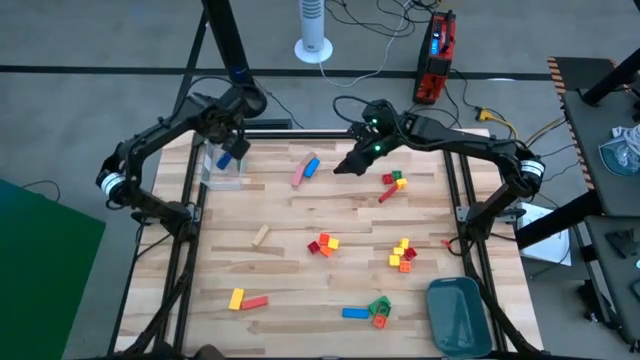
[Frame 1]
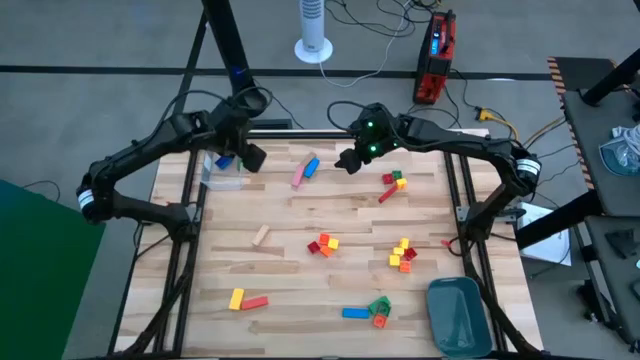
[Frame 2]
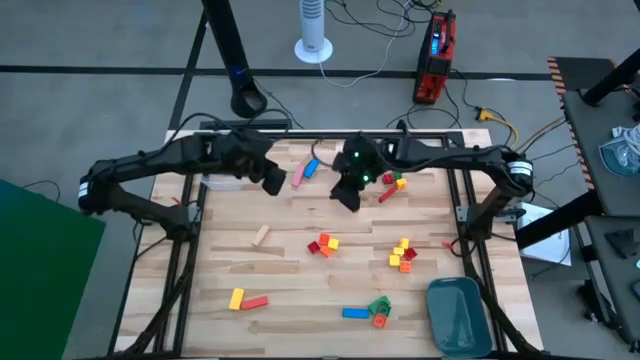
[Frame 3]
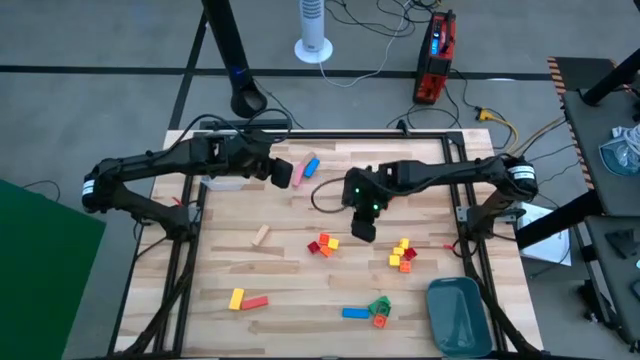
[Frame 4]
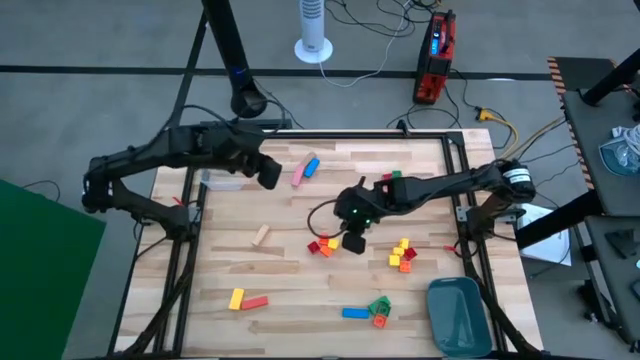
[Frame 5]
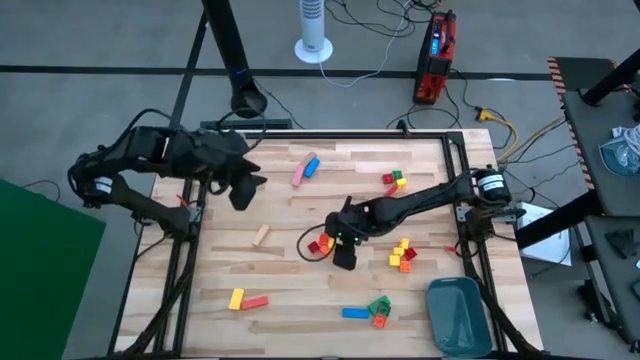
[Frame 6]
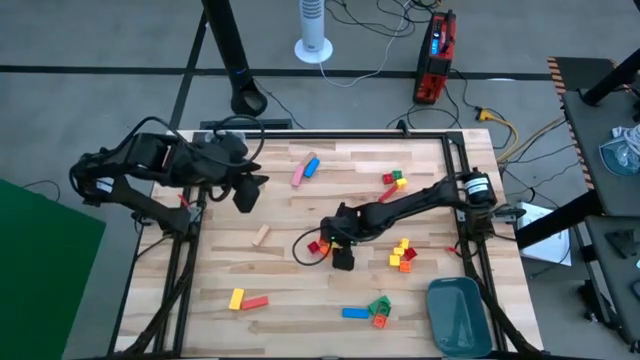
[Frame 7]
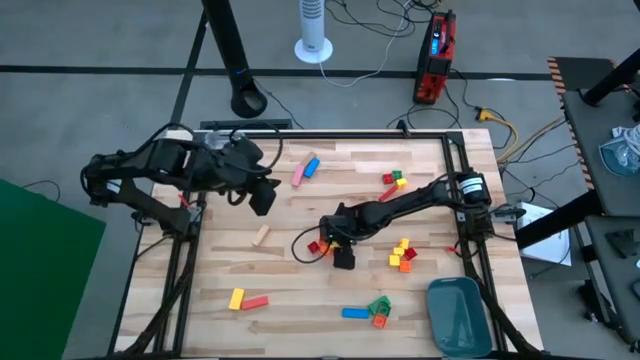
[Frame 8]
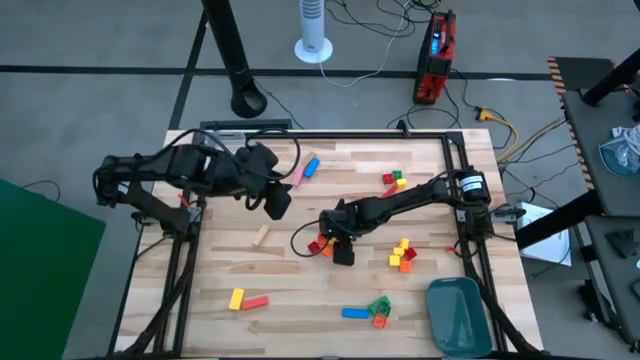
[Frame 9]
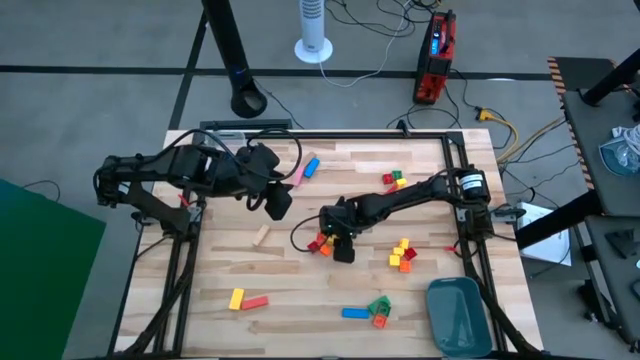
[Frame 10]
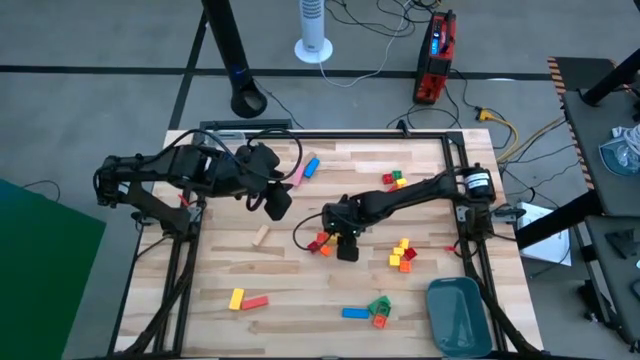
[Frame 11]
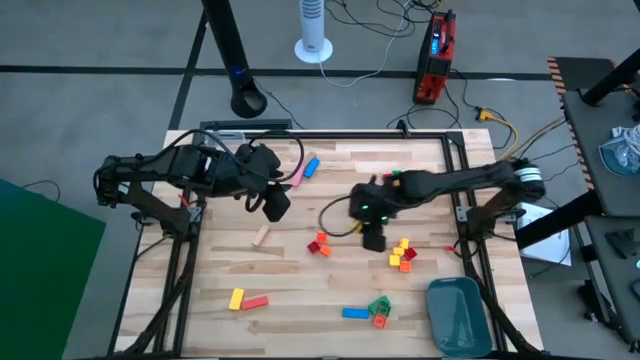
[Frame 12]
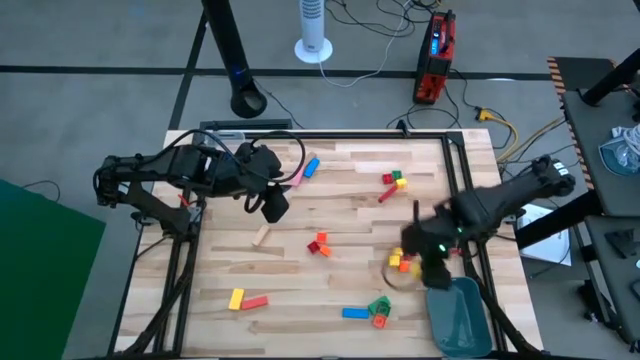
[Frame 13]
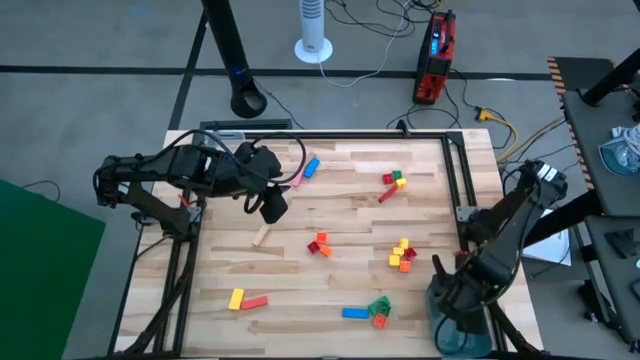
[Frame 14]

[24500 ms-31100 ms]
Task: Sort blocks by size
Put the yellow square wooden block into the blue bin

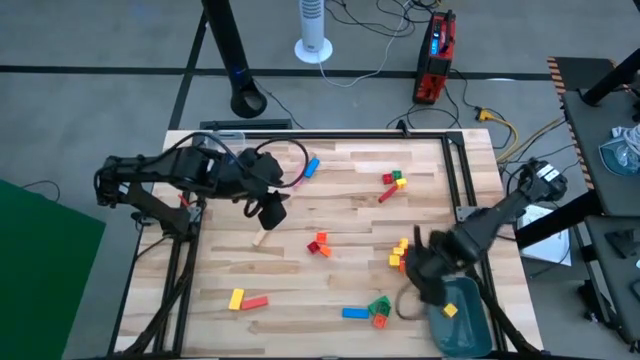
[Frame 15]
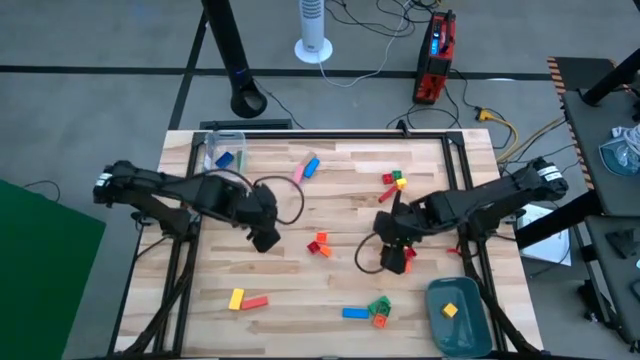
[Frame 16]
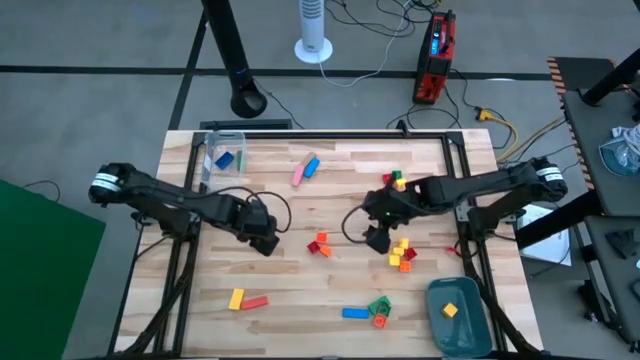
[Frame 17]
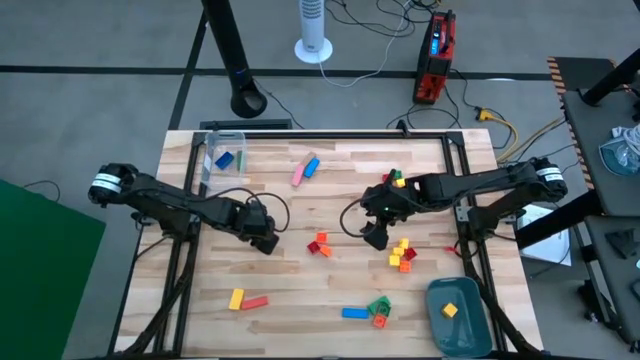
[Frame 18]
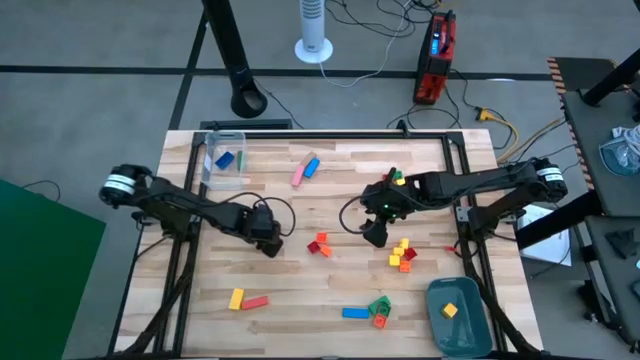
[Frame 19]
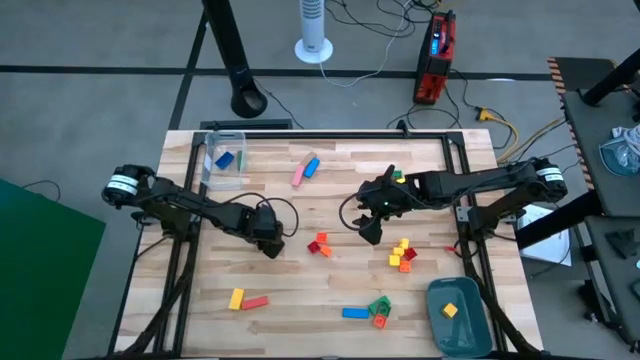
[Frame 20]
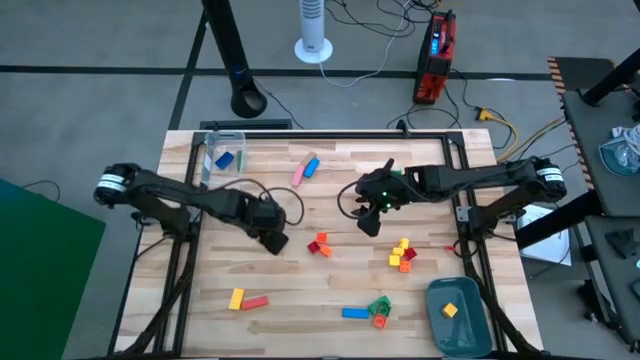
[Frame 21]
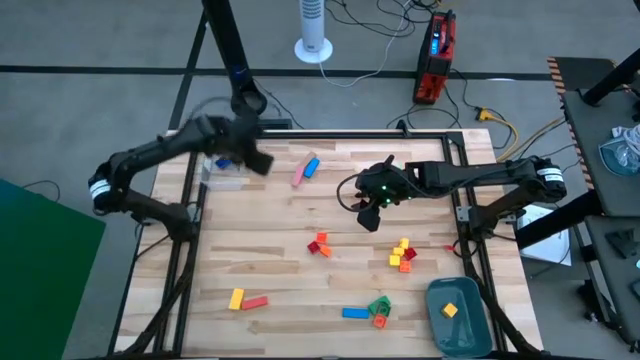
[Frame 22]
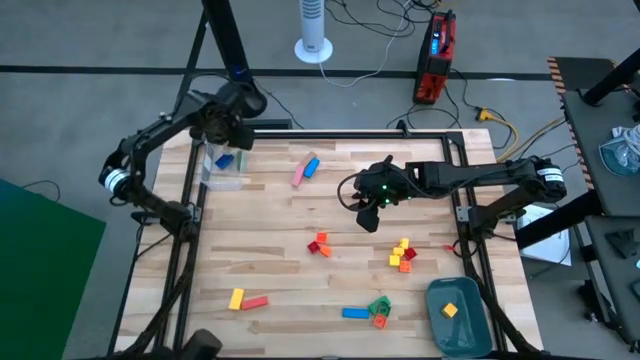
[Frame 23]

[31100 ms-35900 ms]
Put the brown rectangular wooden block into the transparent bin

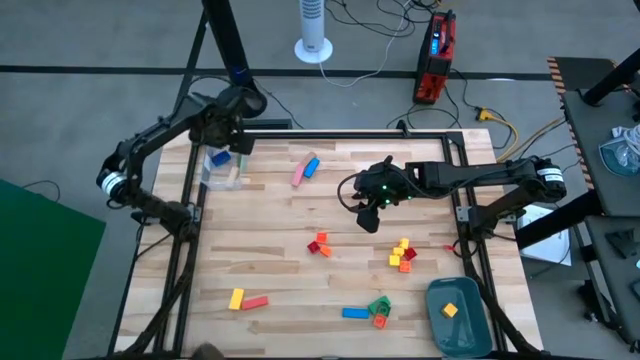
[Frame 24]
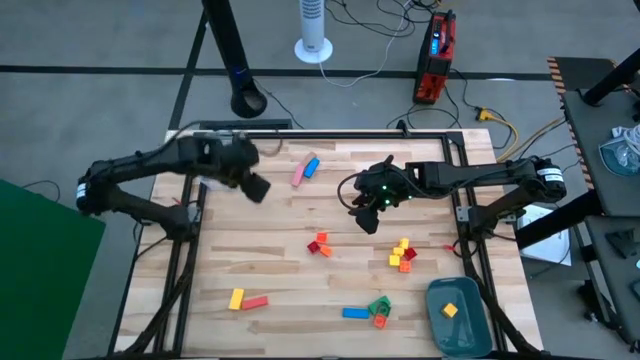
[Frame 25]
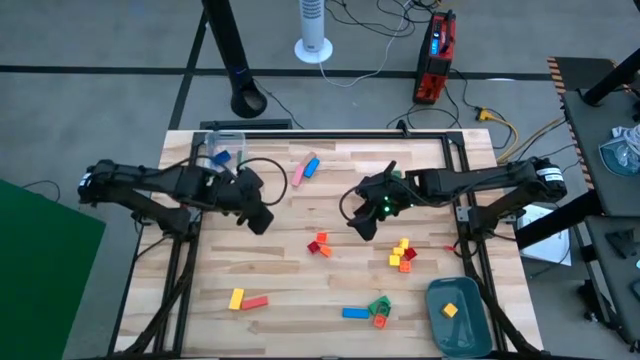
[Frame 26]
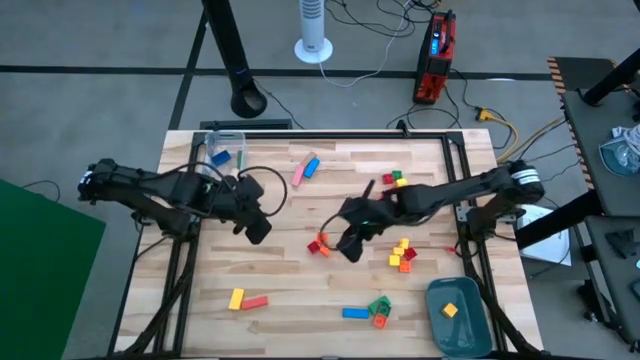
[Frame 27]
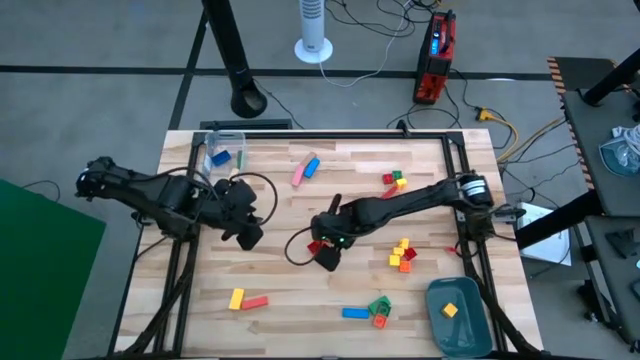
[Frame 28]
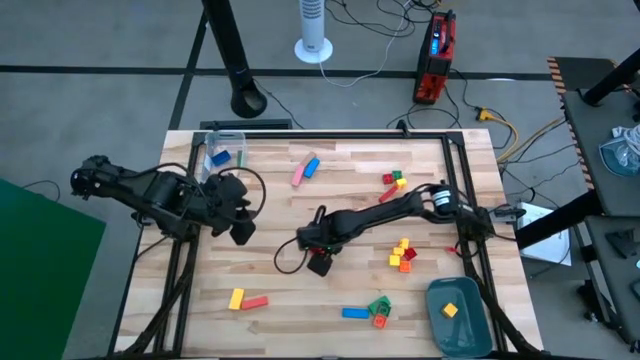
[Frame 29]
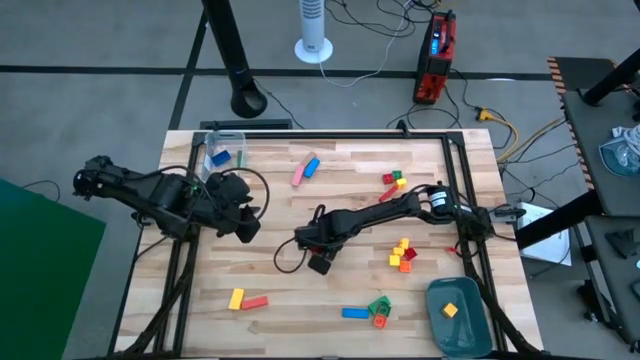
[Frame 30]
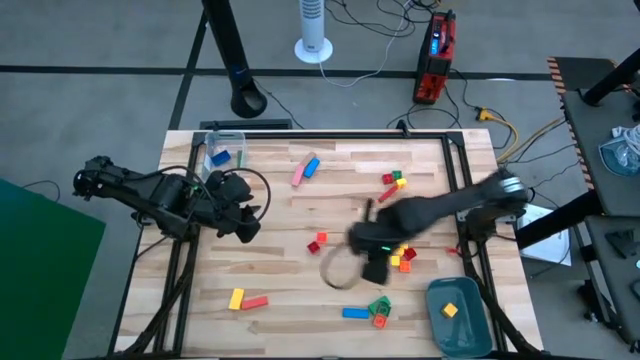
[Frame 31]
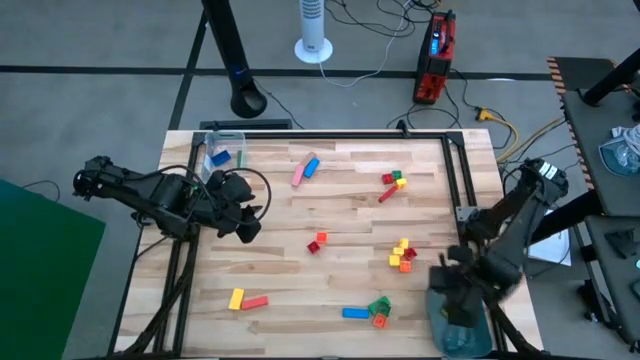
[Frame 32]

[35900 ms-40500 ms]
Put the orange square game piece into the blue bin

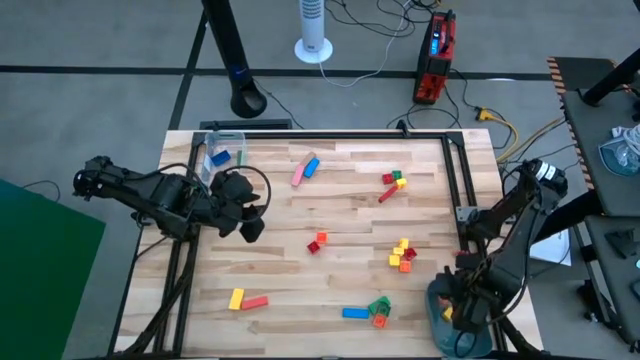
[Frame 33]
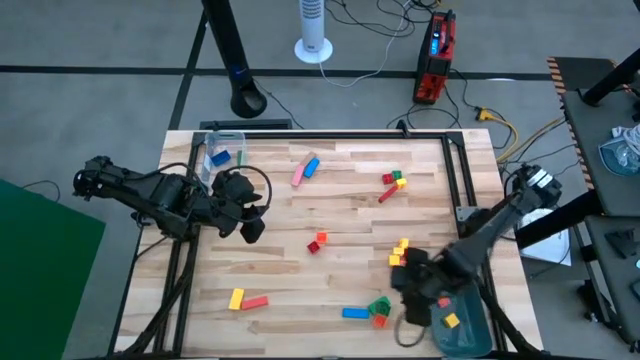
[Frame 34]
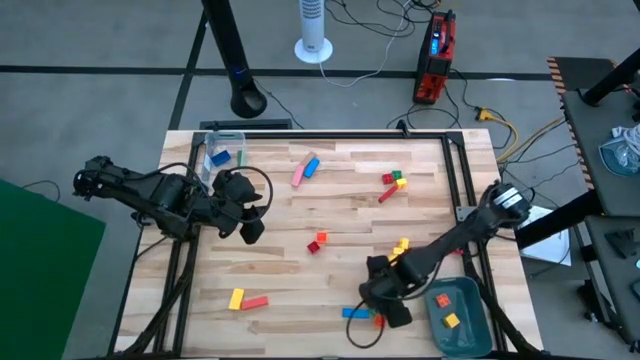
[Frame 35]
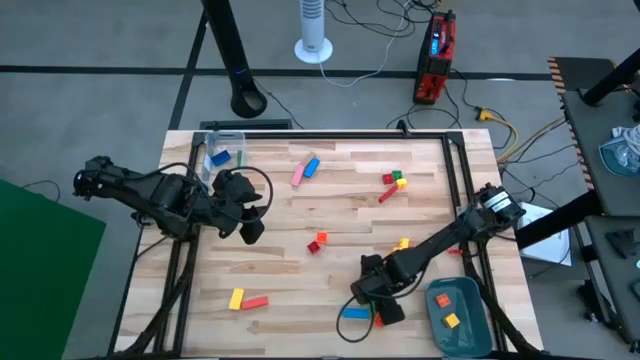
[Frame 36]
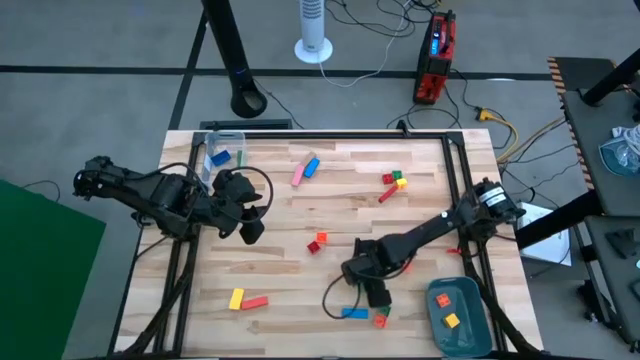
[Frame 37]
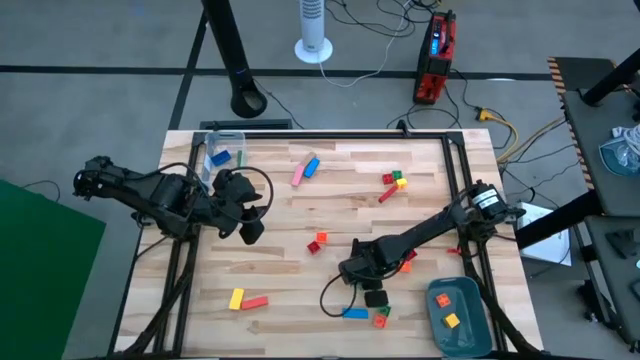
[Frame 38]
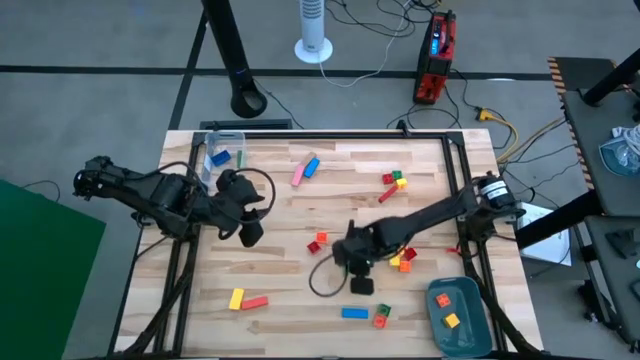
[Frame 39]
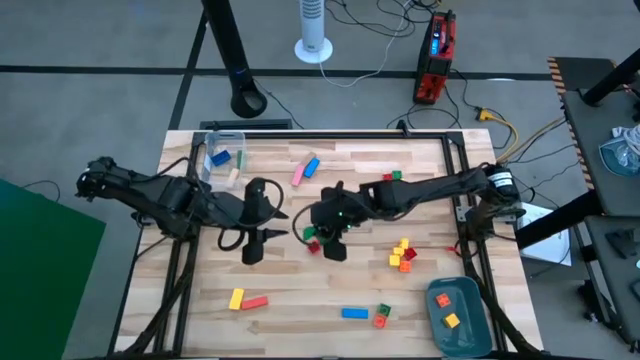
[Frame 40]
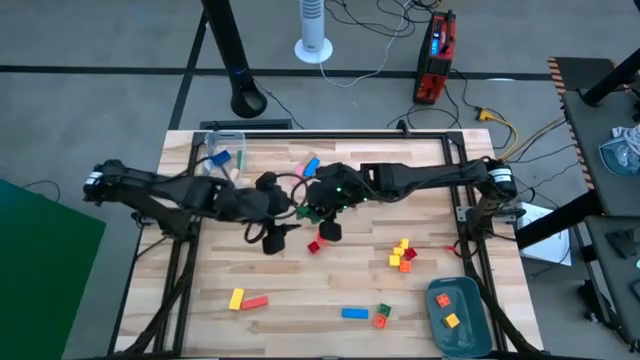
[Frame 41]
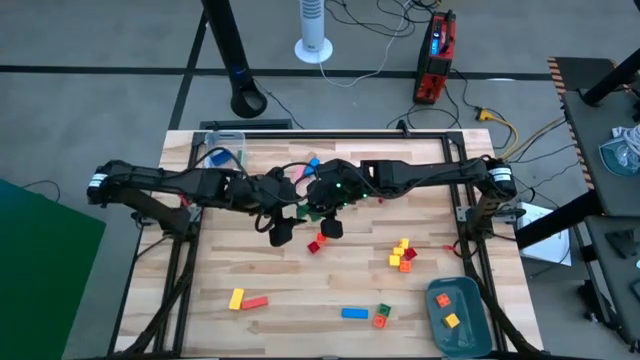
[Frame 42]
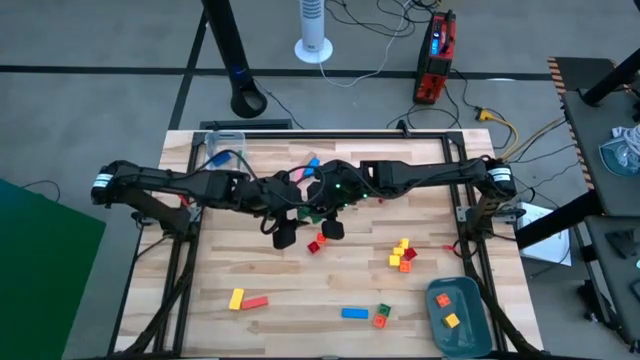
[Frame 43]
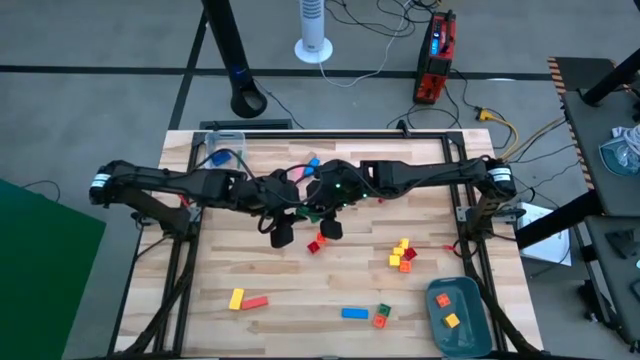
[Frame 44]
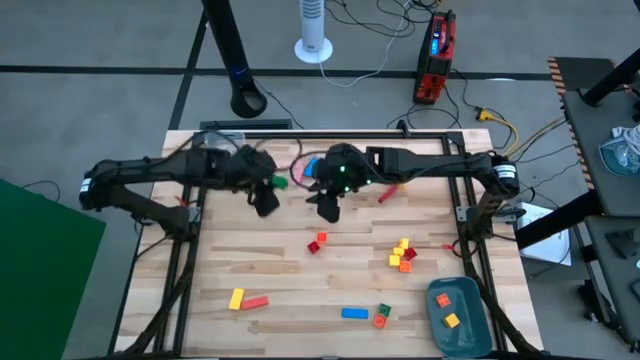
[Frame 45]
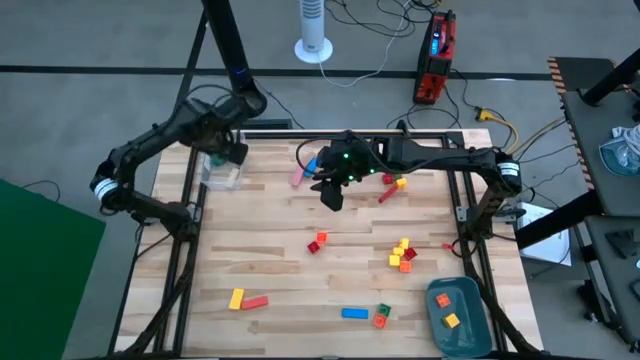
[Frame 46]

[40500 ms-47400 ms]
Put the green arch shaped wooden block into the transparent bin
